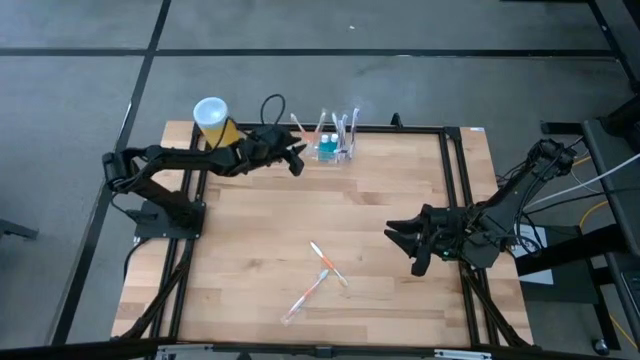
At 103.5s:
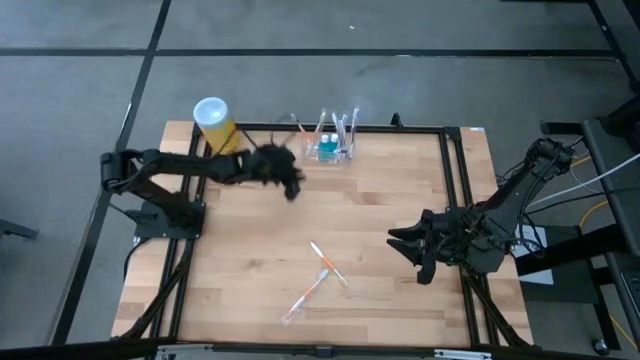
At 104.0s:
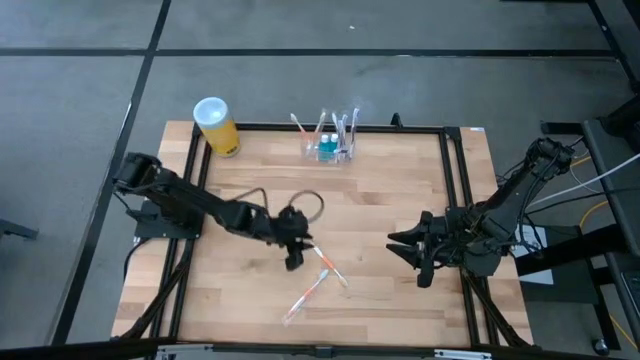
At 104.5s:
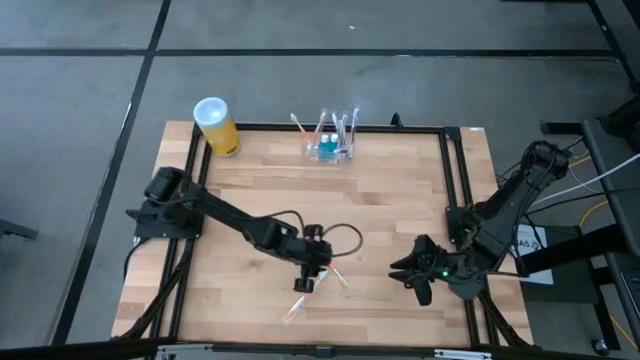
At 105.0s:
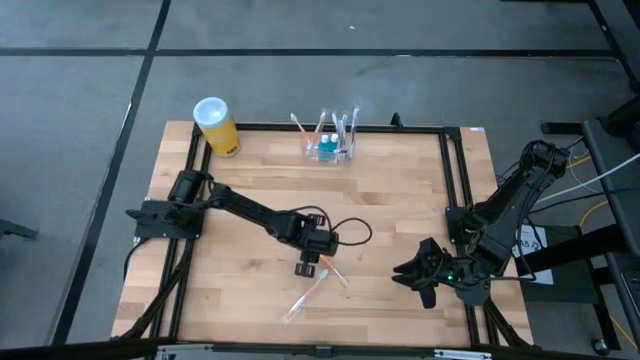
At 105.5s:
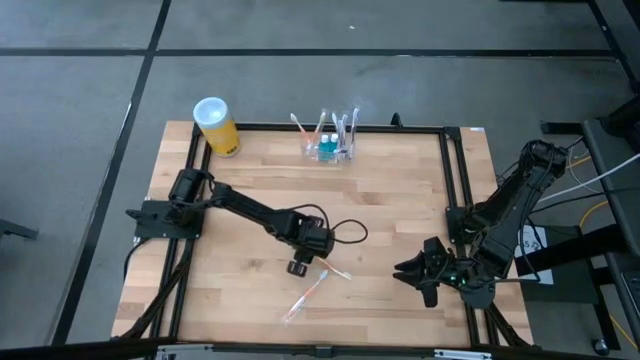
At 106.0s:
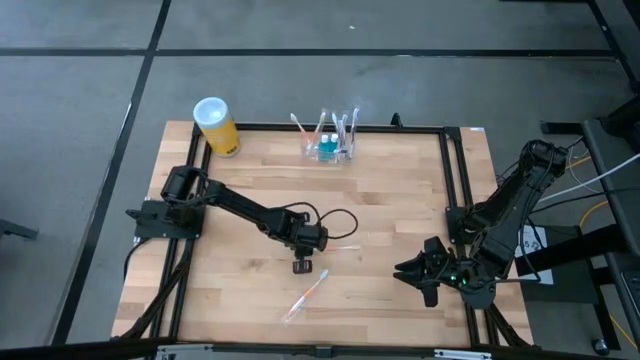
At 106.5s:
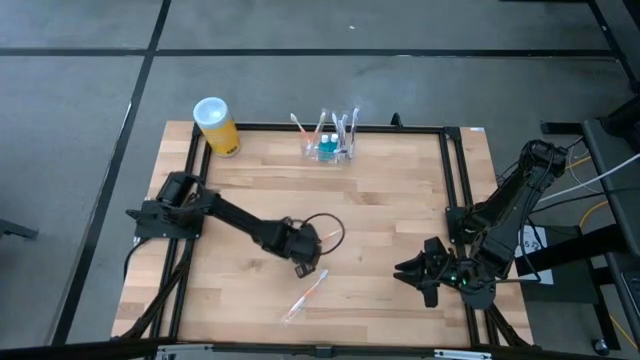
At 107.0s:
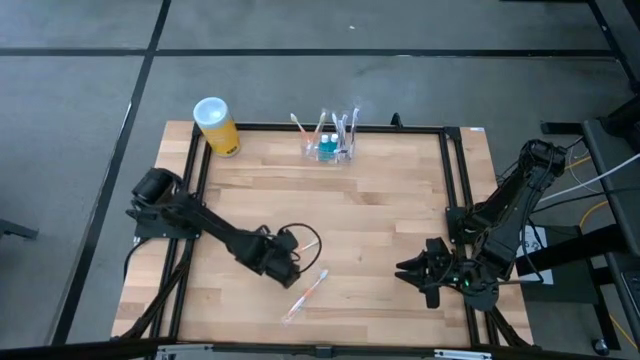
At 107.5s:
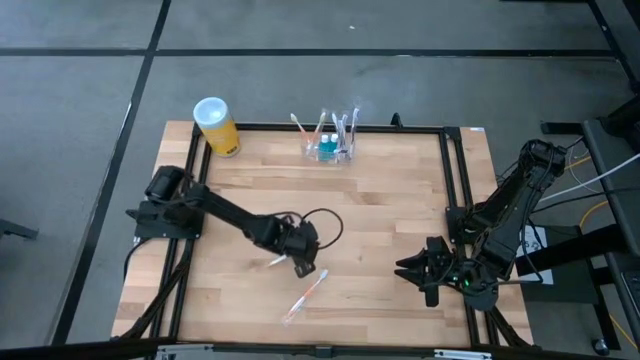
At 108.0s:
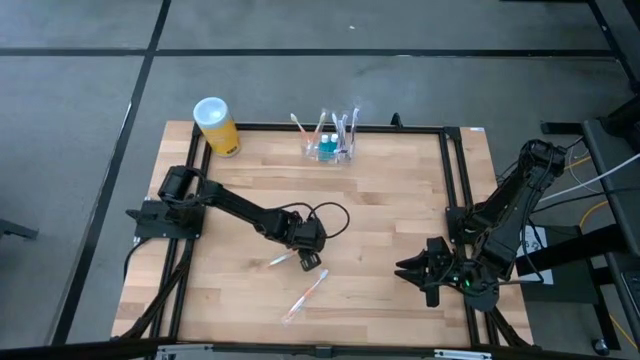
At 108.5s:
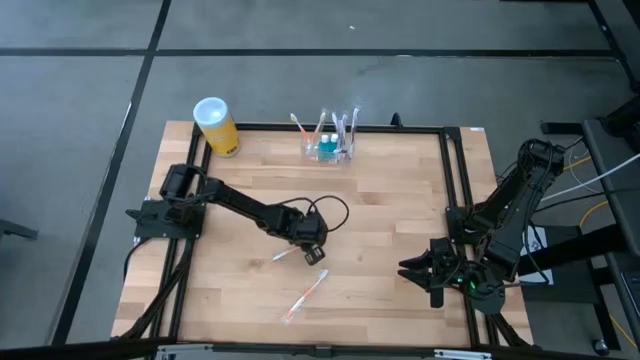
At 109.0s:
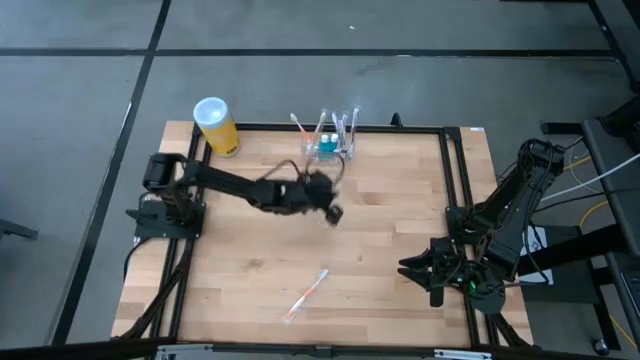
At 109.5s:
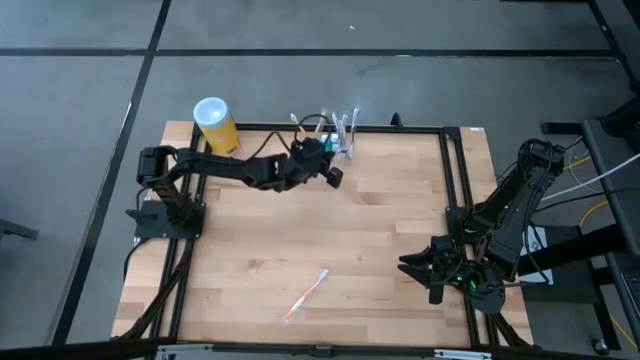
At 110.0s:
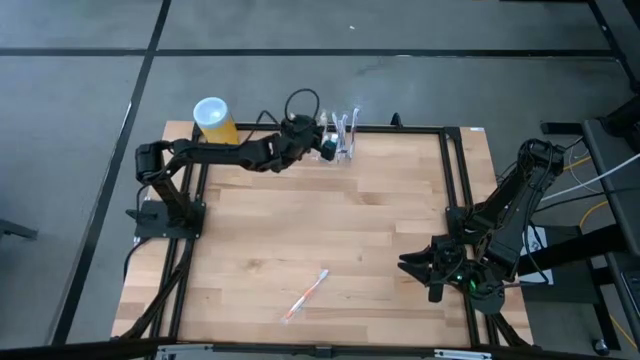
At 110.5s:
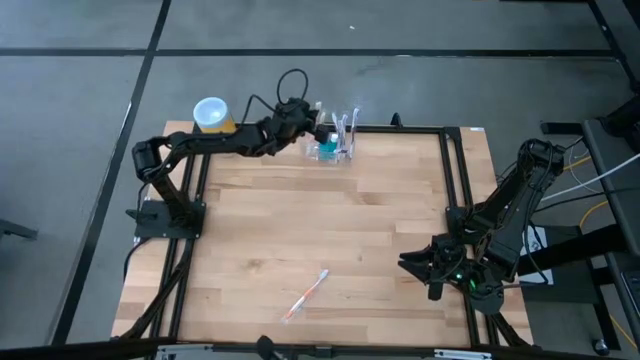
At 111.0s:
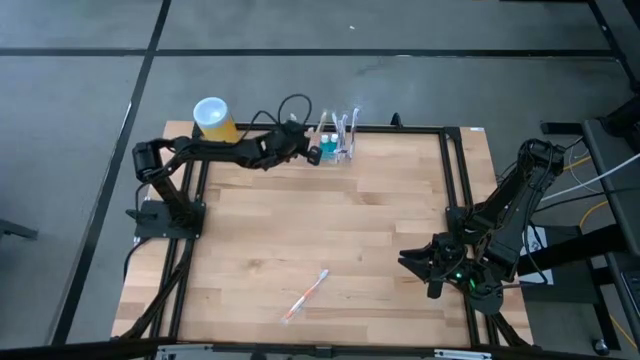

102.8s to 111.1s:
Task: Pick & Place toothbrushing station
Put the orange toothbrush into the left section of the transparent organizer

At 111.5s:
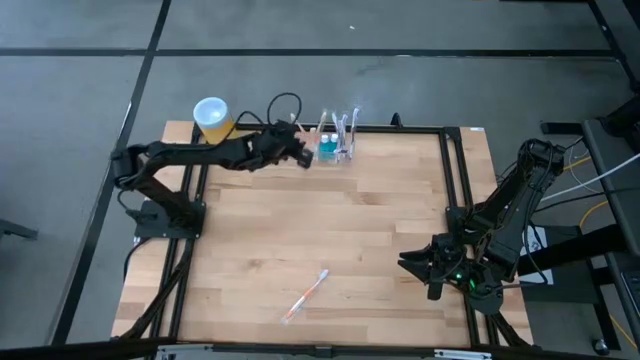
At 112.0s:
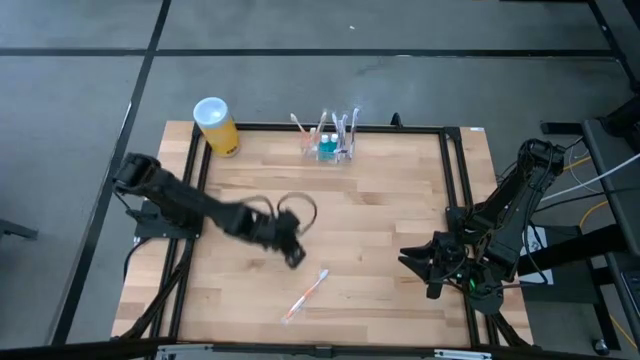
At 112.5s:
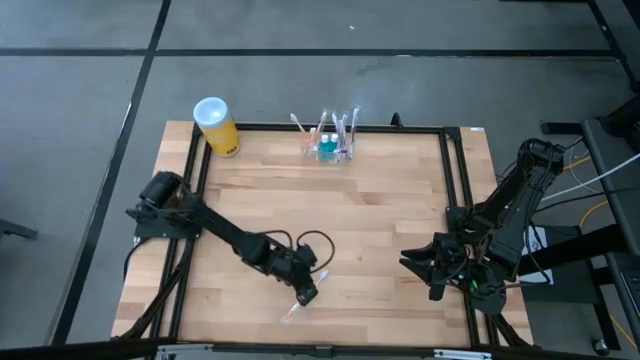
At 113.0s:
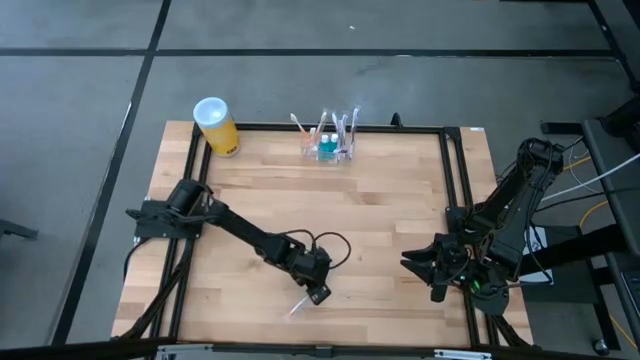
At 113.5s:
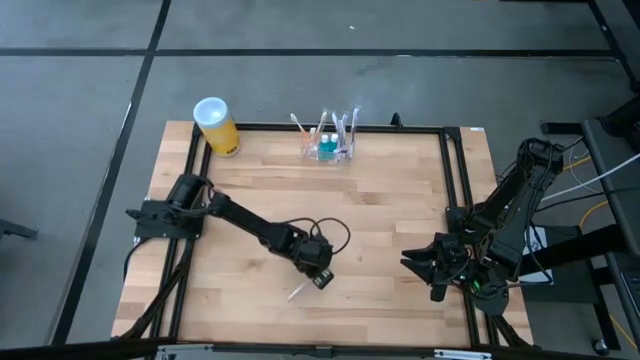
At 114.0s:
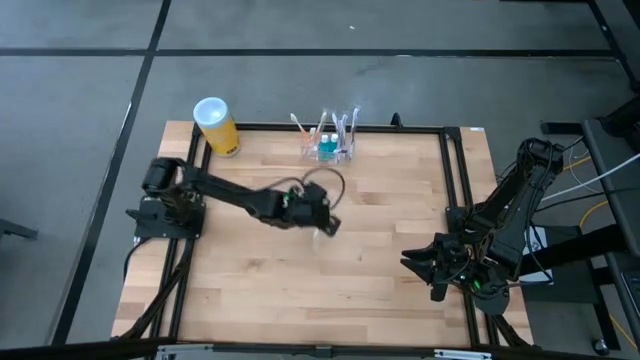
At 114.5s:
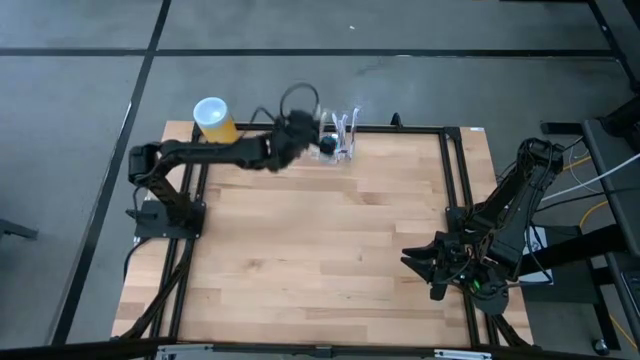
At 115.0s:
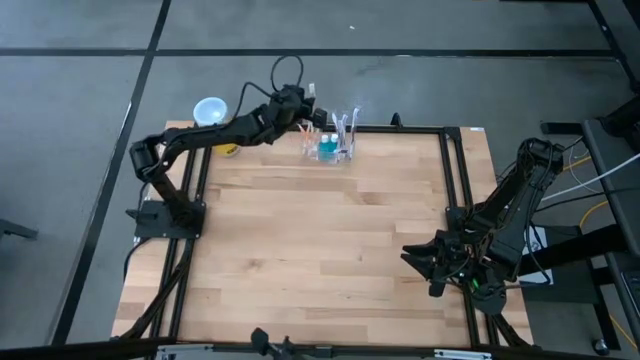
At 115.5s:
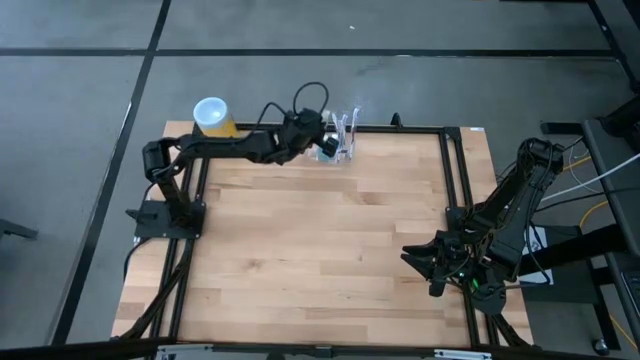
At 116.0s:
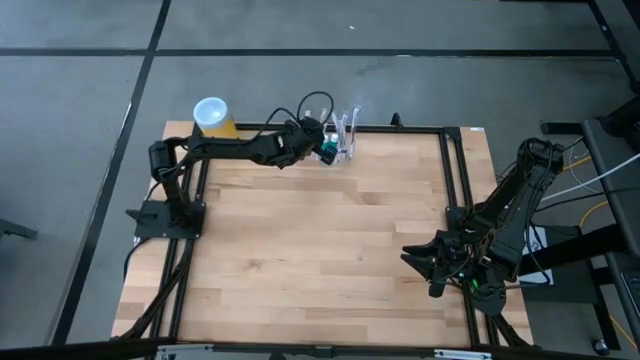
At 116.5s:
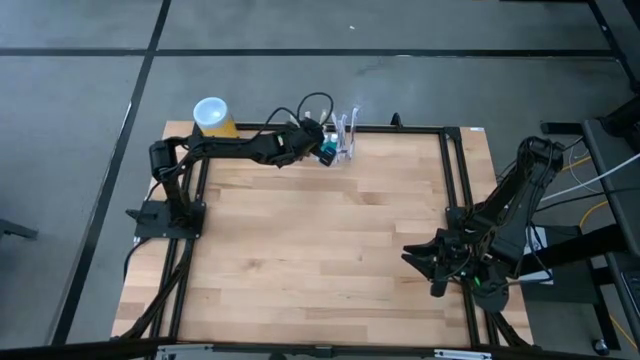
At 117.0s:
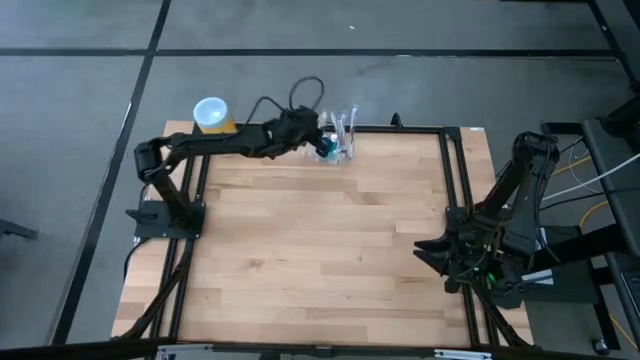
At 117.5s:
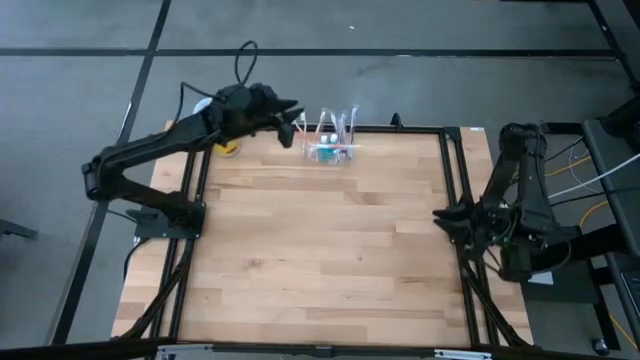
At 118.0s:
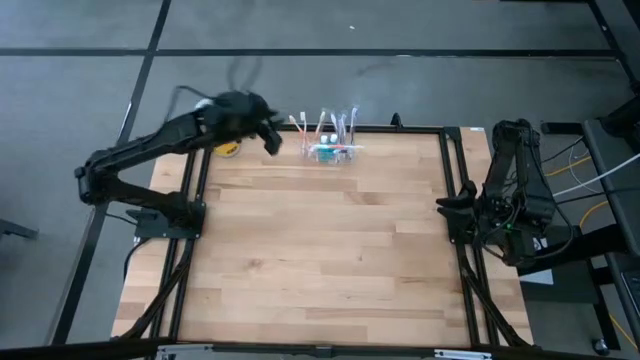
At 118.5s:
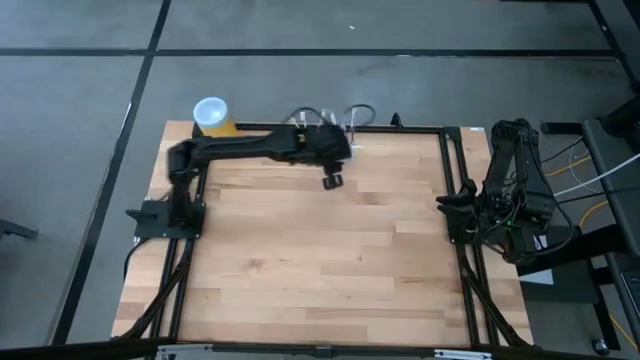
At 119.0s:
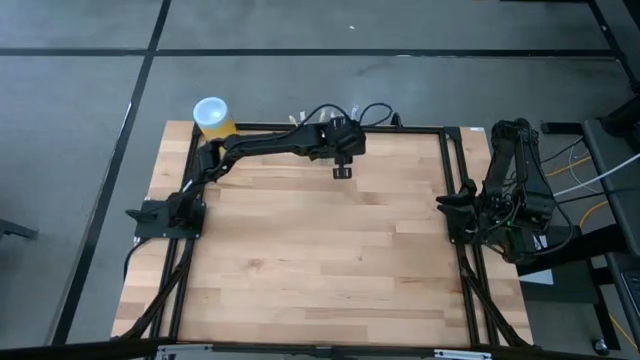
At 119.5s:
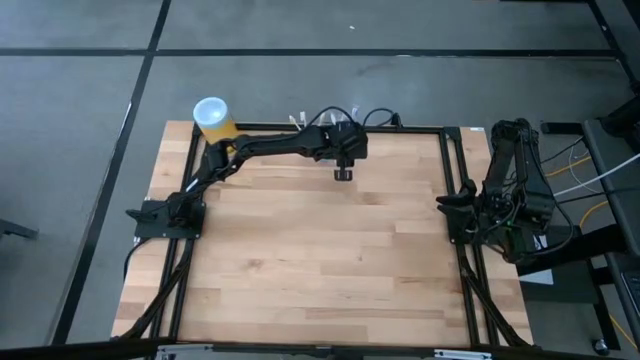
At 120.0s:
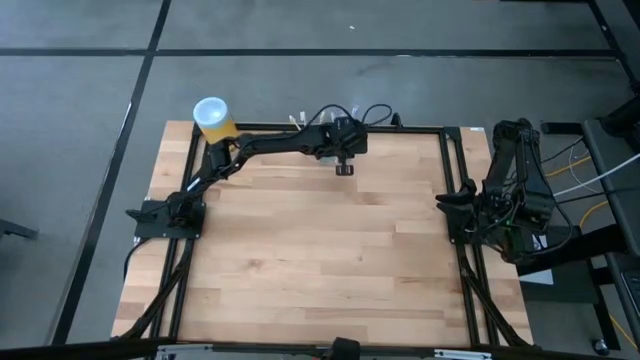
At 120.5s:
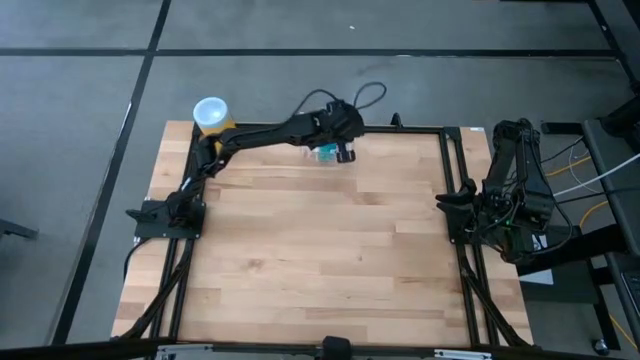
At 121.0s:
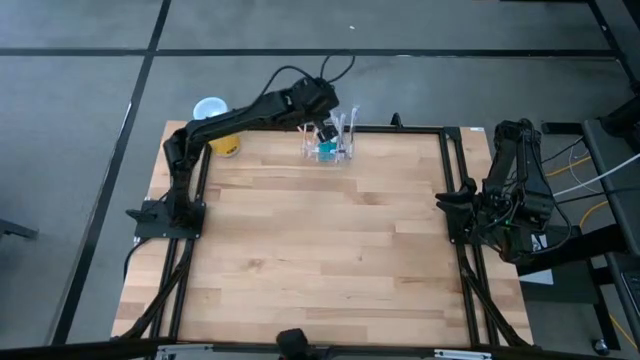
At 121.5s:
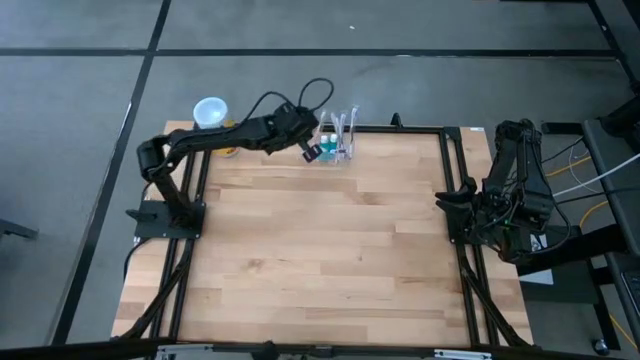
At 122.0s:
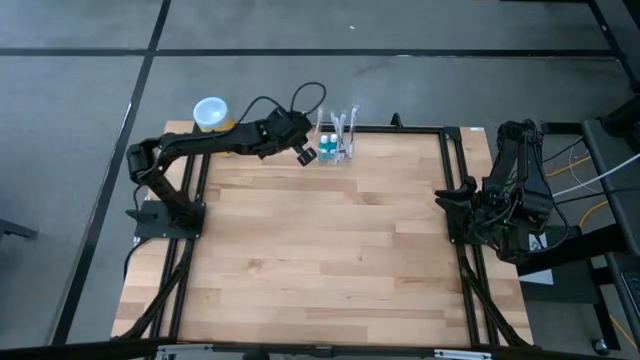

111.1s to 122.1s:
Put the orange toothbrush into the left section of the transparent organizer

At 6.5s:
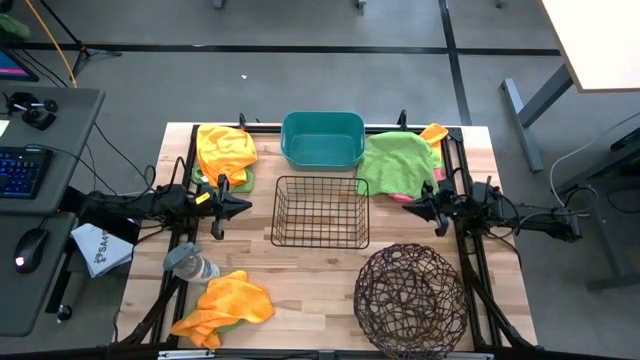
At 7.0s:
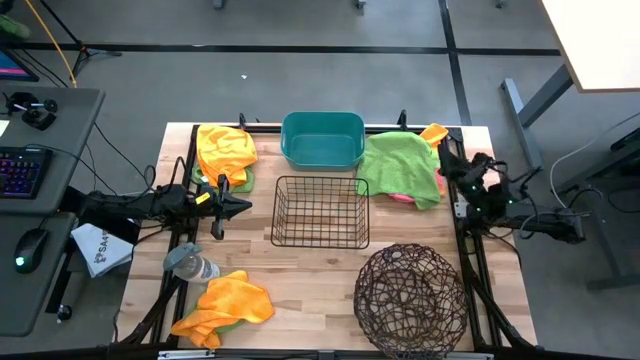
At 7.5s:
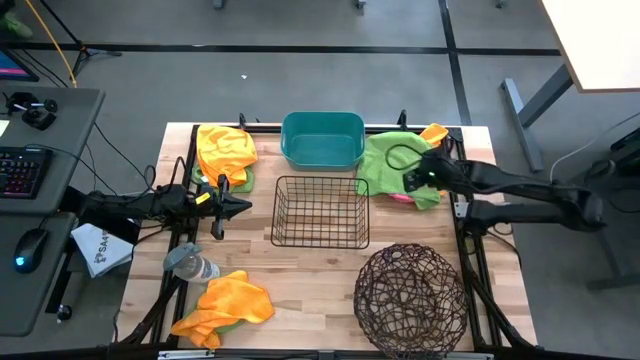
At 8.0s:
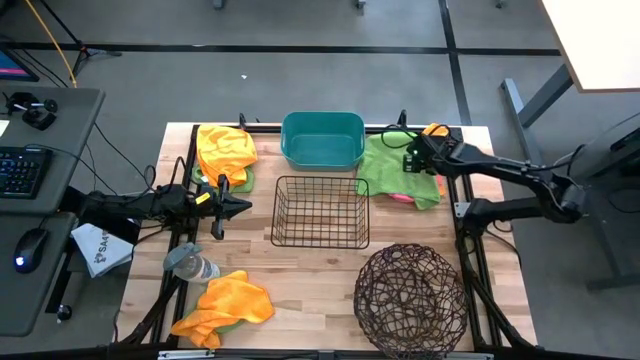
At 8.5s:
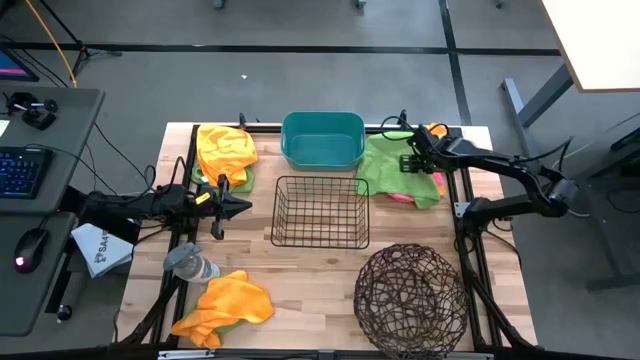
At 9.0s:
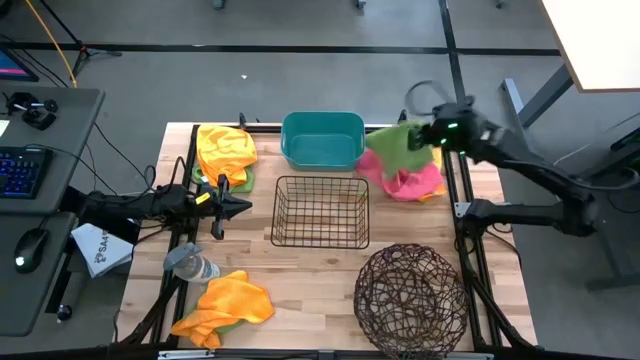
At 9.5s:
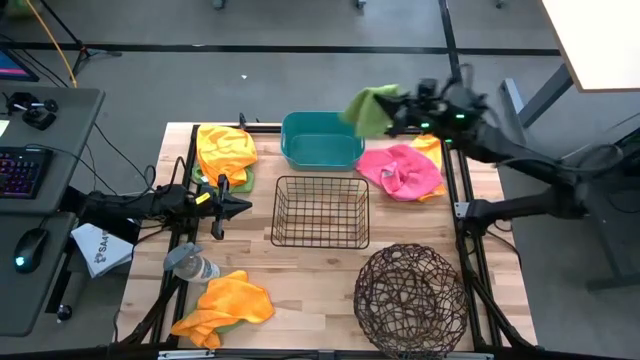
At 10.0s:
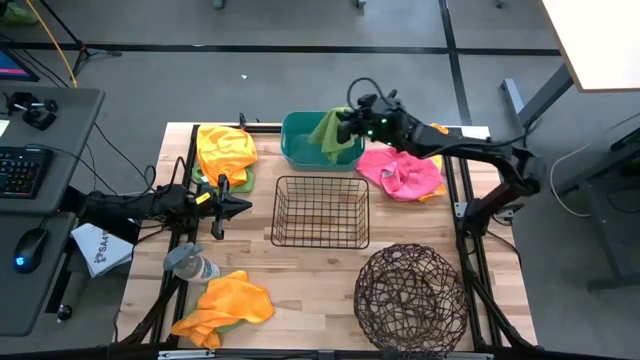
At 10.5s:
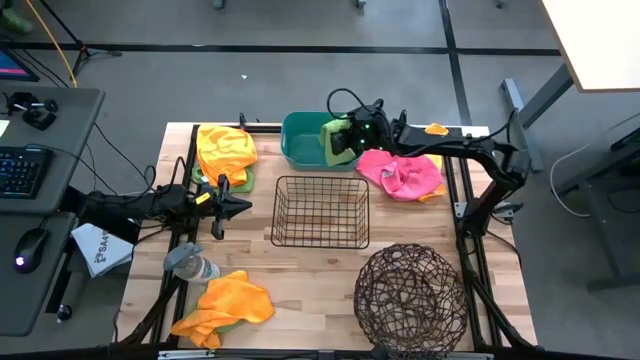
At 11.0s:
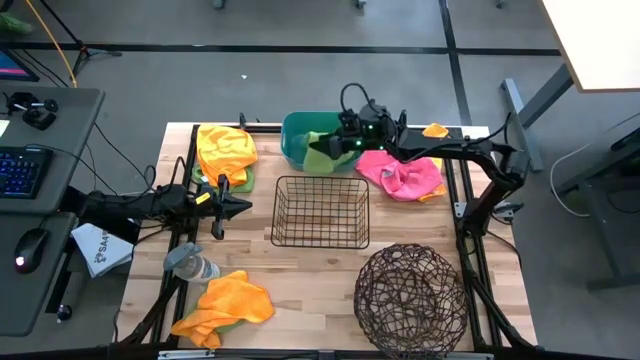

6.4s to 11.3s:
Task: Sort microfiber towel by color & place in baskets
Put the right green microfiber cloth into the blue bin
